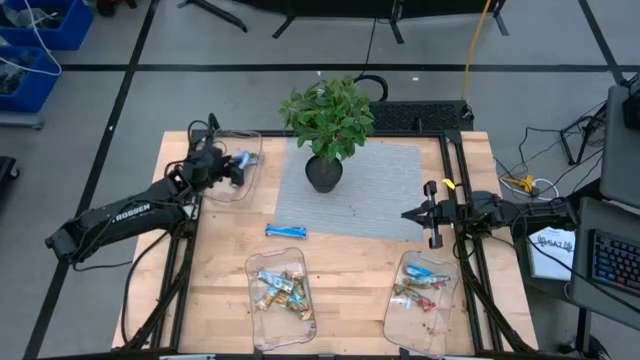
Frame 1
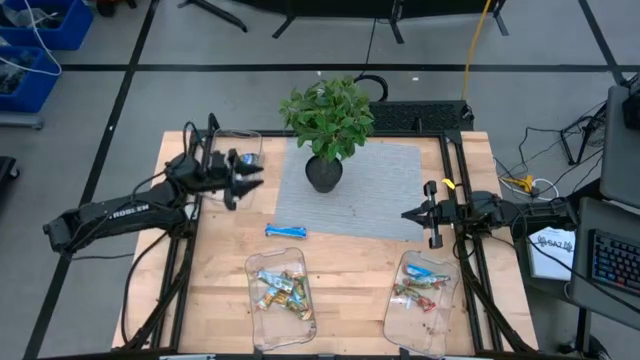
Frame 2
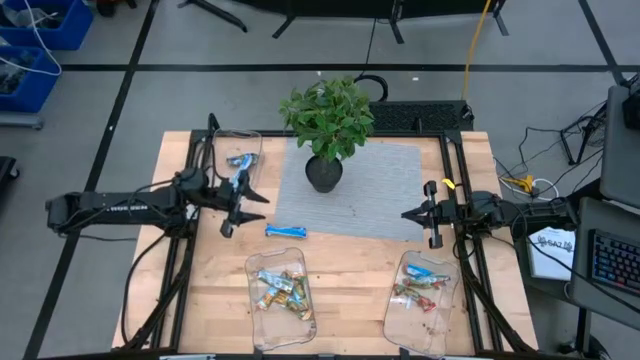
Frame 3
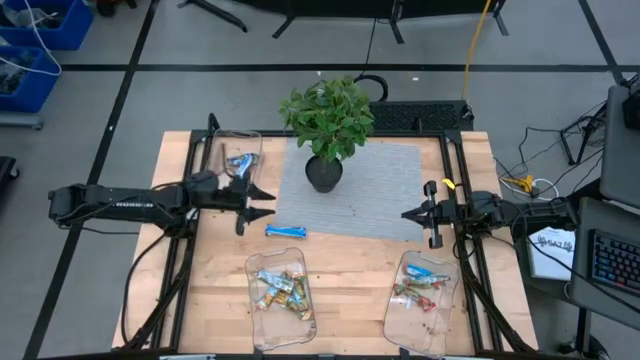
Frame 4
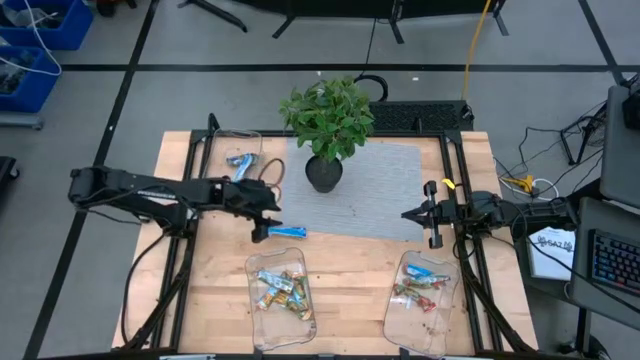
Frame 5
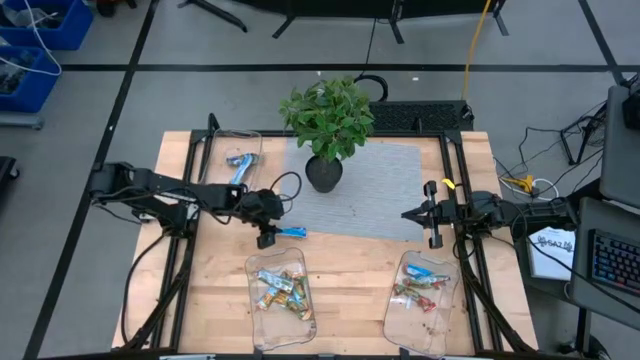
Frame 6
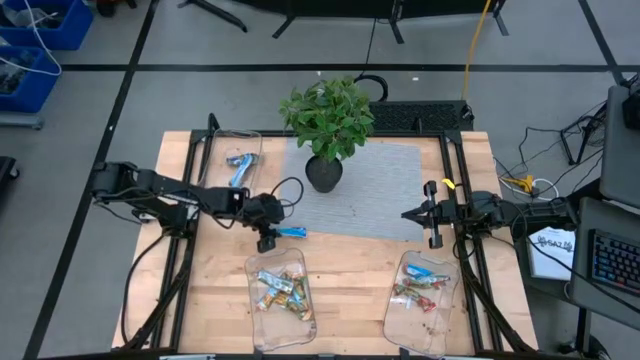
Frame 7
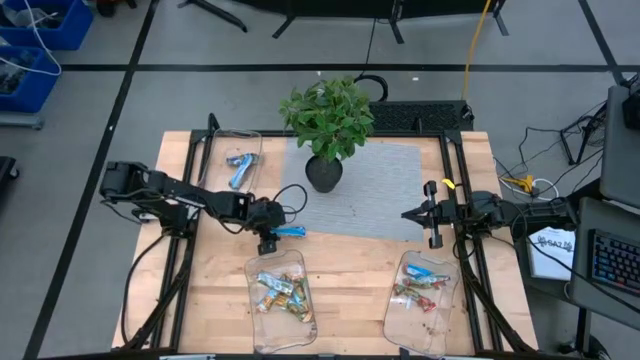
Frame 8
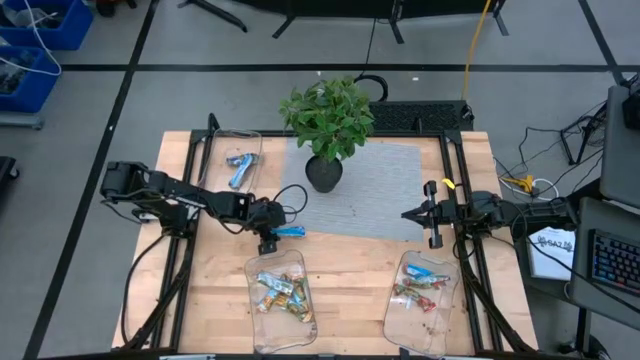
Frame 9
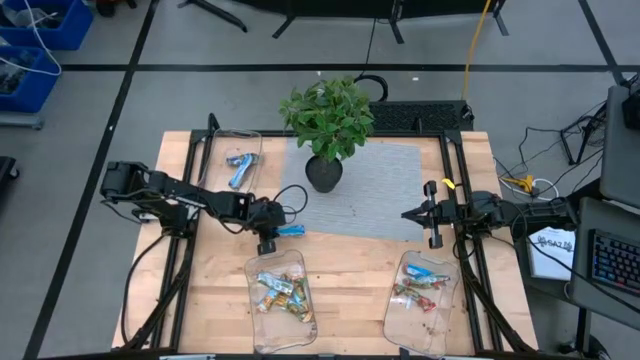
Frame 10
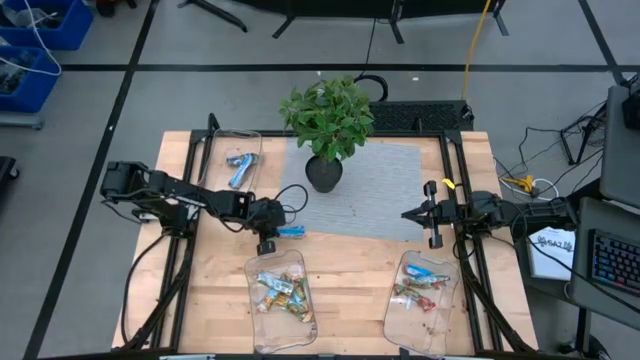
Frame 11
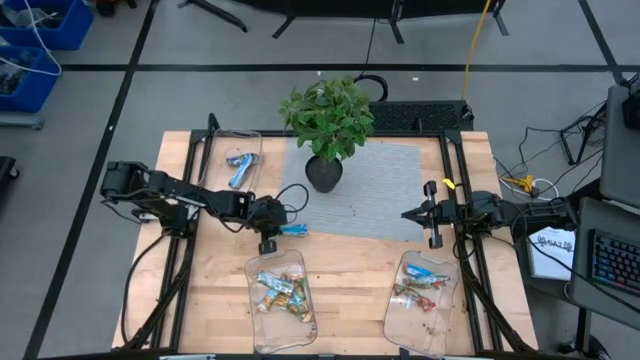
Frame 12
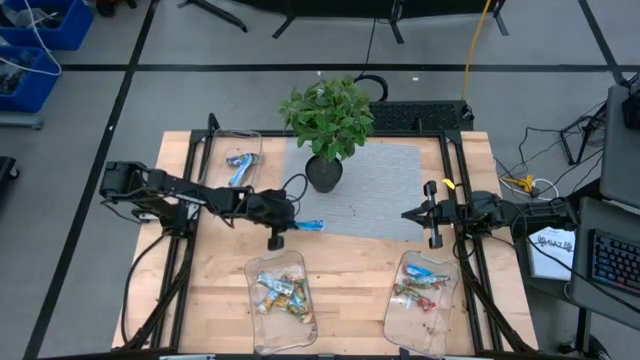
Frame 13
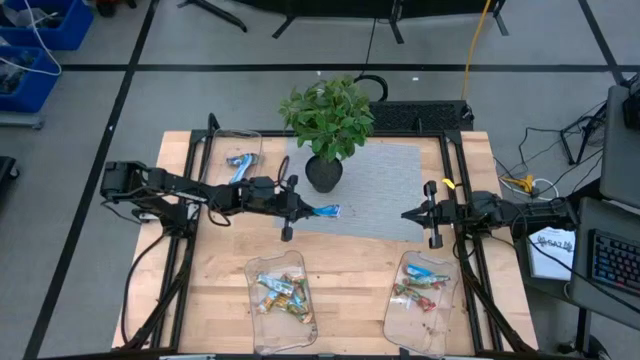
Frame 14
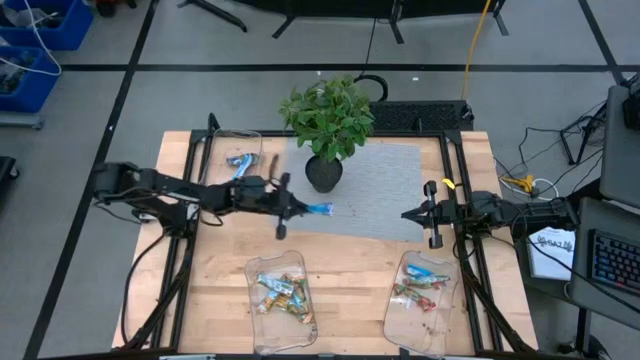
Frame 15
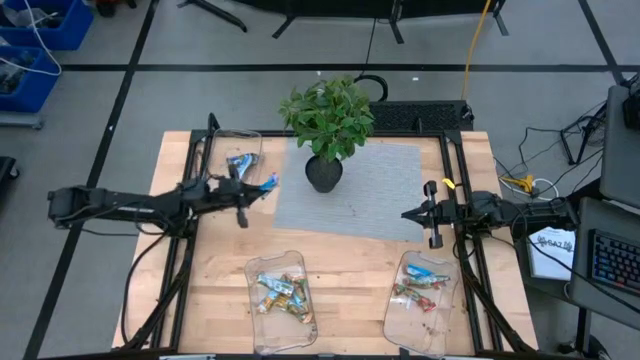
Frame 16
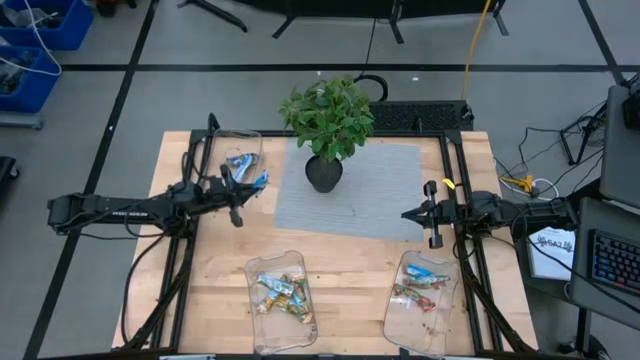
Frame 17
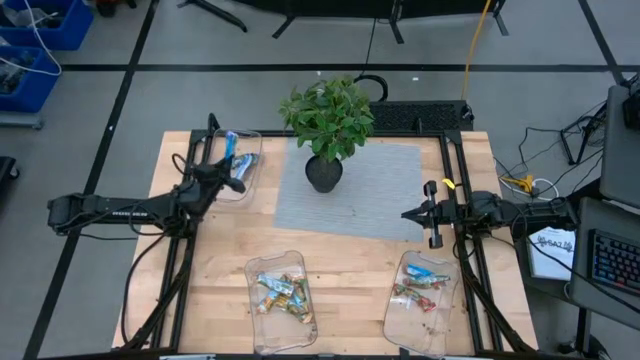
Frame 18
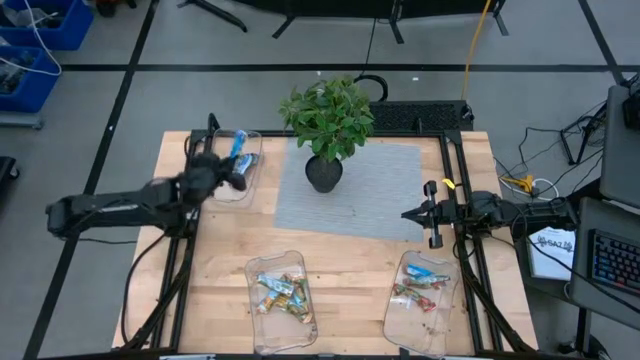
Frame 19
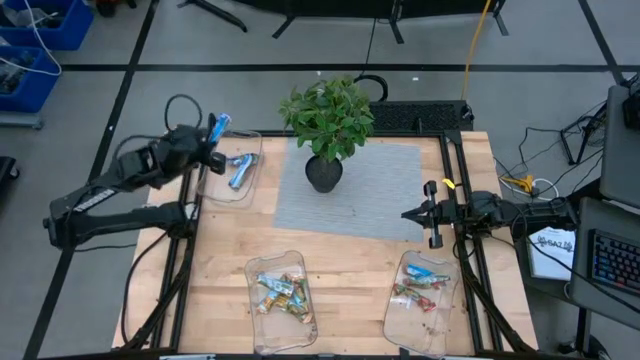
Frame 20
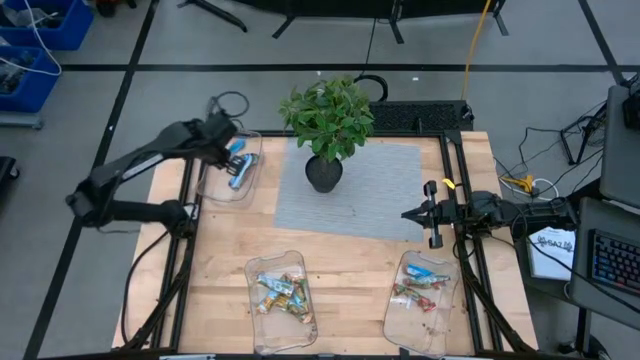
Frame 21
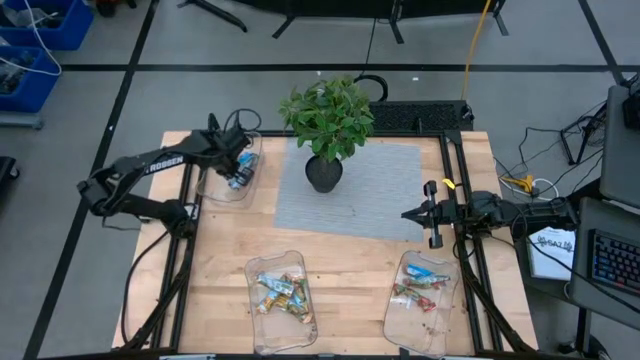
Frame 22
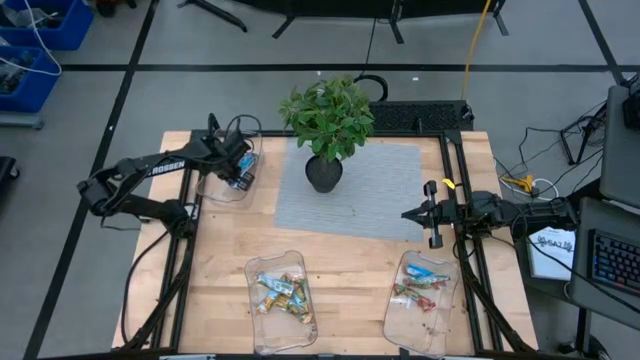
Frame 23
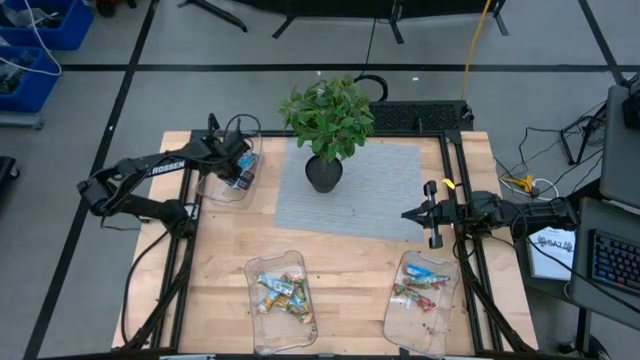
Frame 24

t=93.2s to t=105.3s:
Task: Pick and place Granola Bars by type
Put the blue granola bar into the top transparent bin

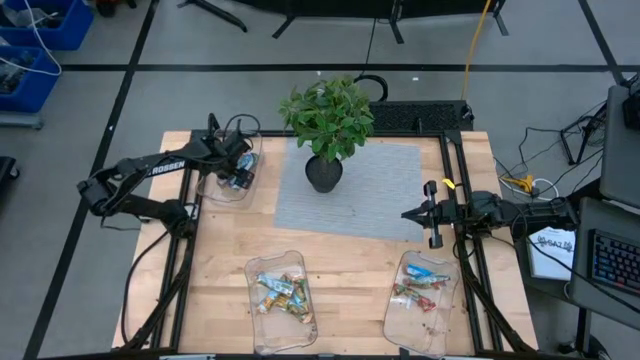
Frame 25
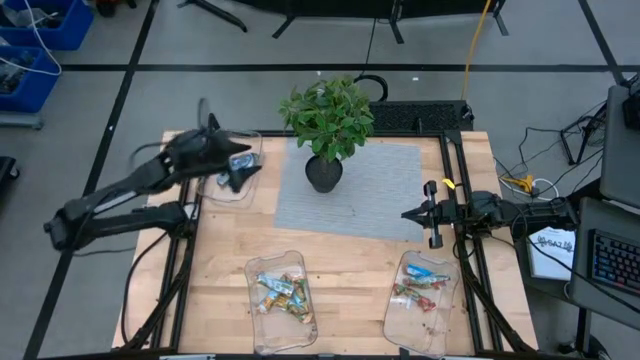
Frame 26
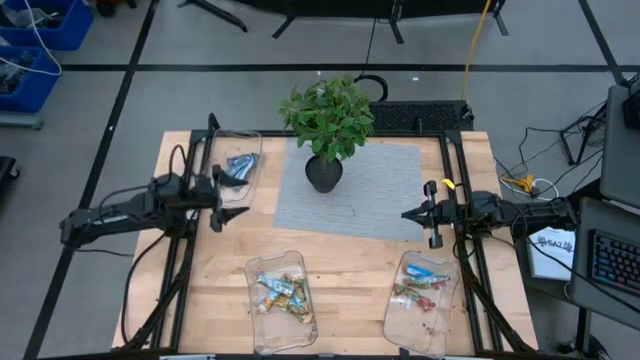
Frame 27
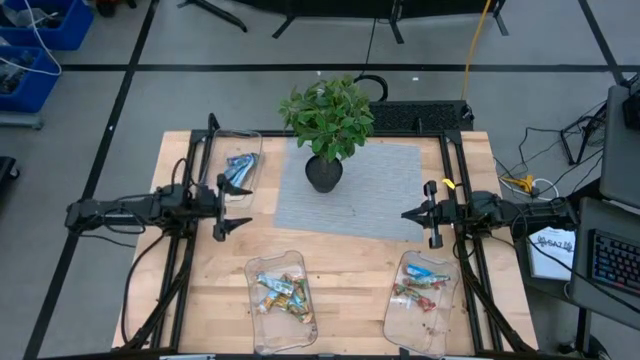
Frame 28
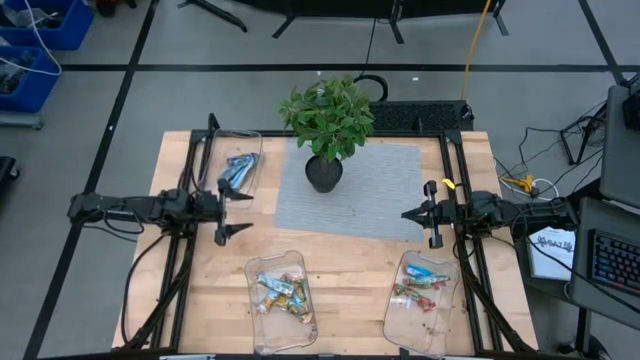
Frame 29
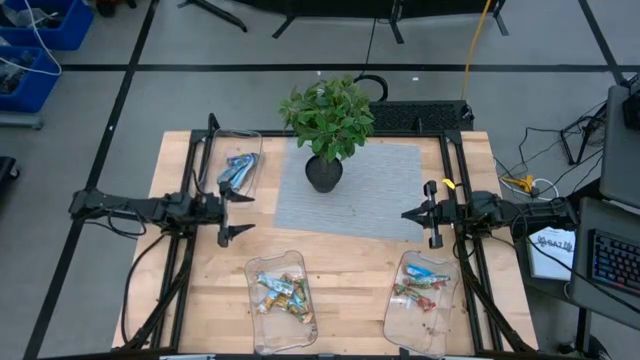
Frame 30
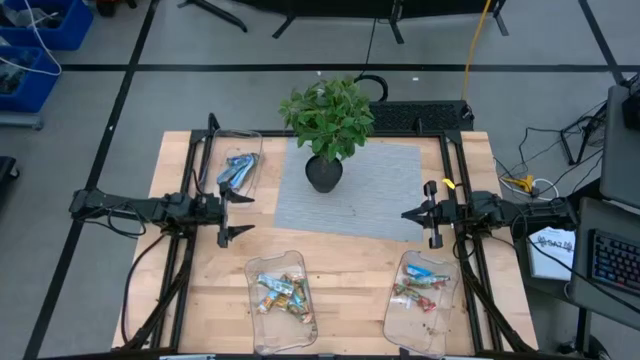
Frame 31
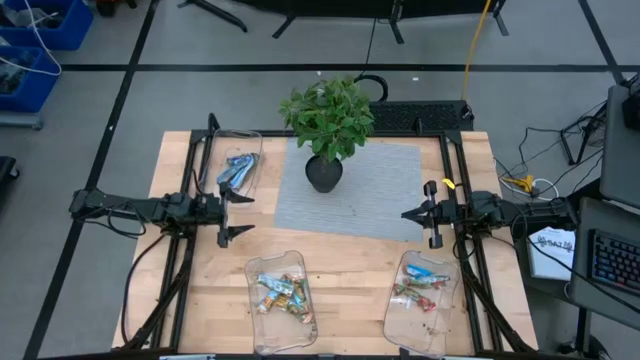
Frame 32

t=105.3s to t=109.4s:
Return to Home Position

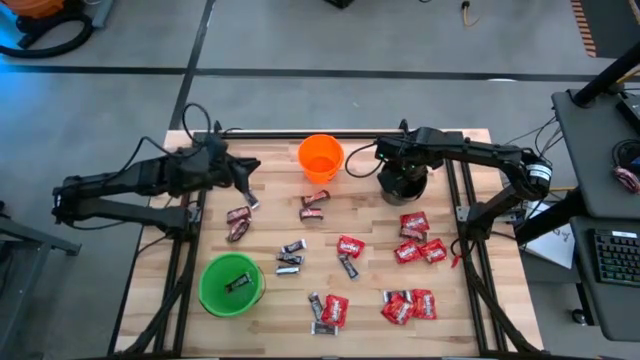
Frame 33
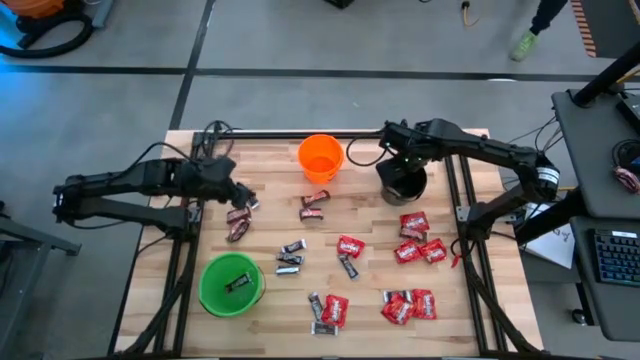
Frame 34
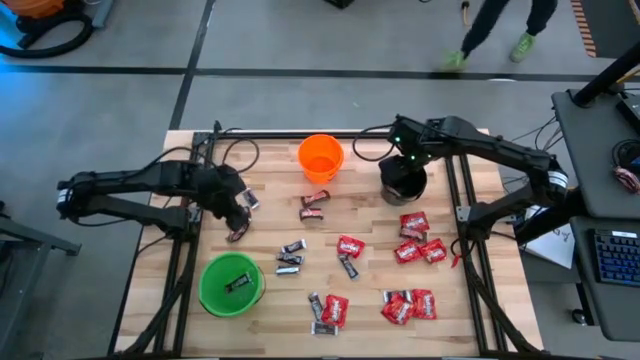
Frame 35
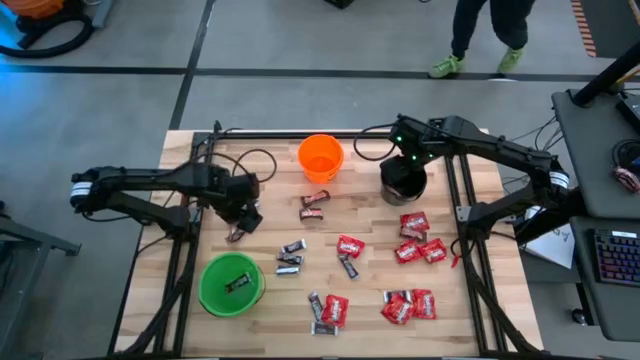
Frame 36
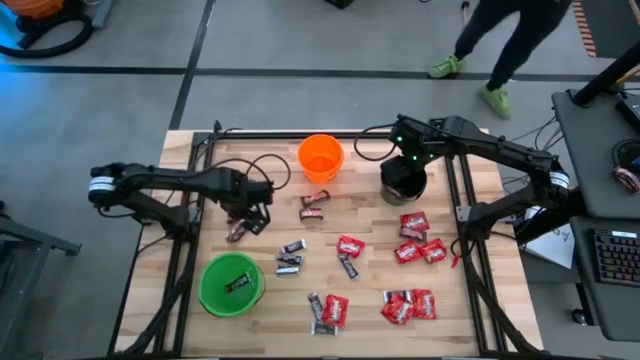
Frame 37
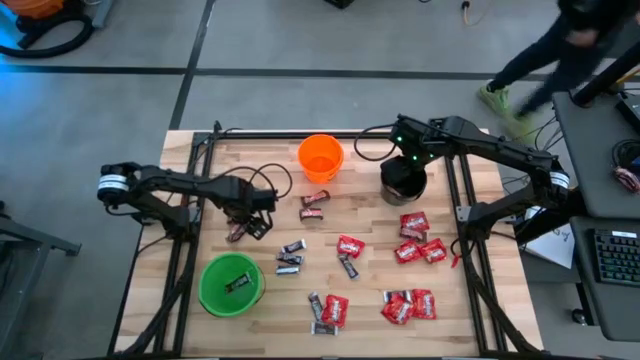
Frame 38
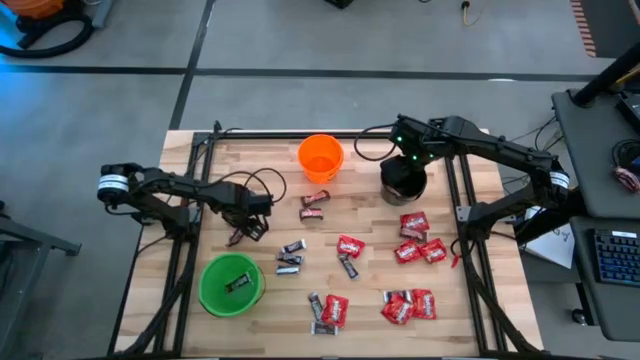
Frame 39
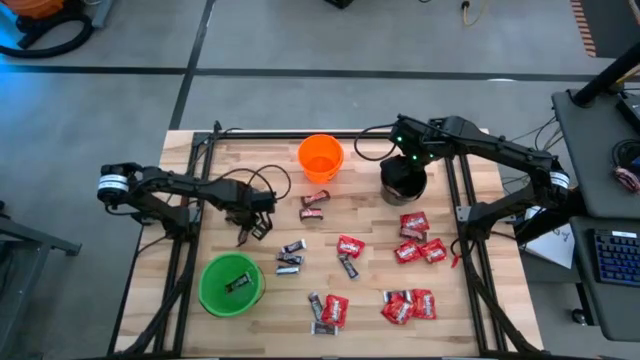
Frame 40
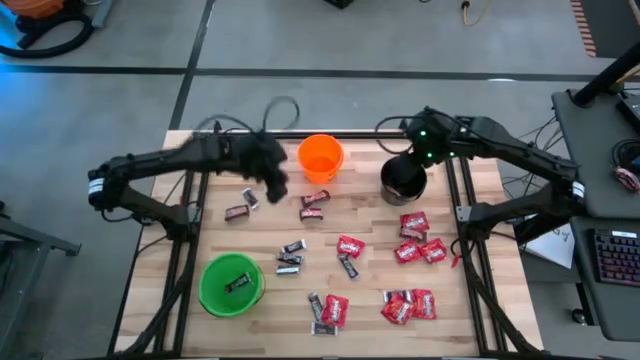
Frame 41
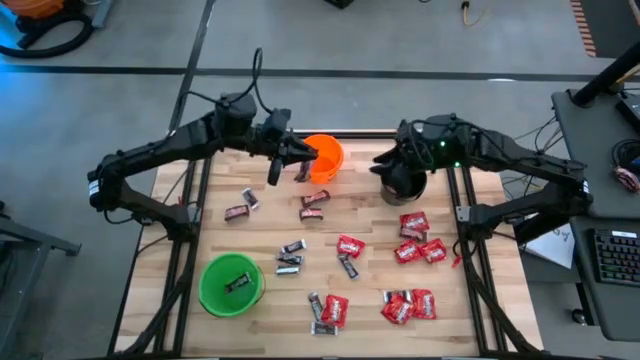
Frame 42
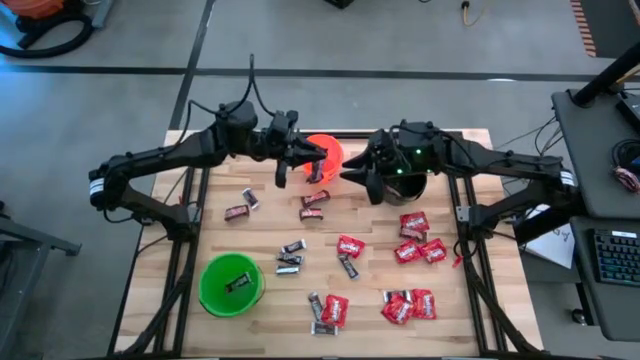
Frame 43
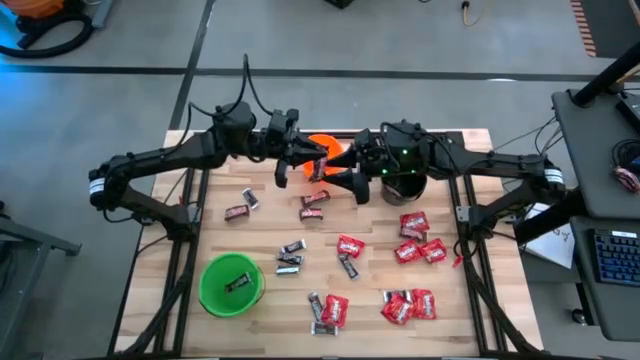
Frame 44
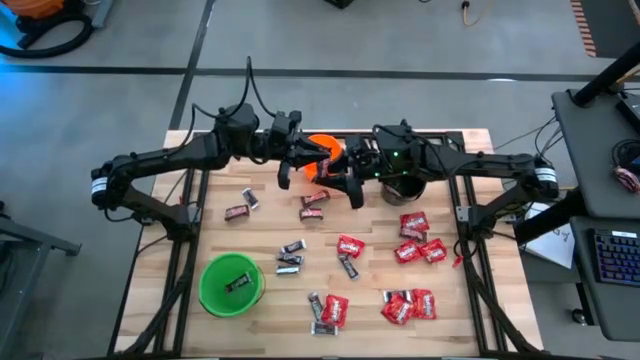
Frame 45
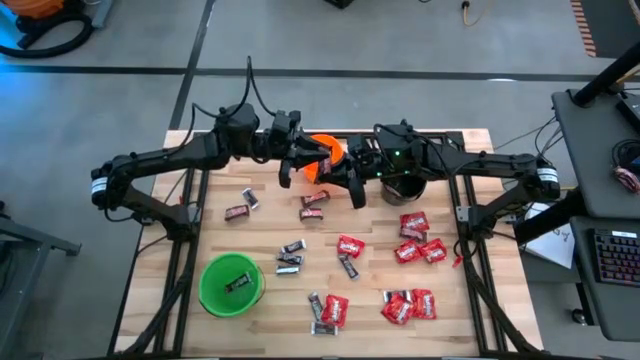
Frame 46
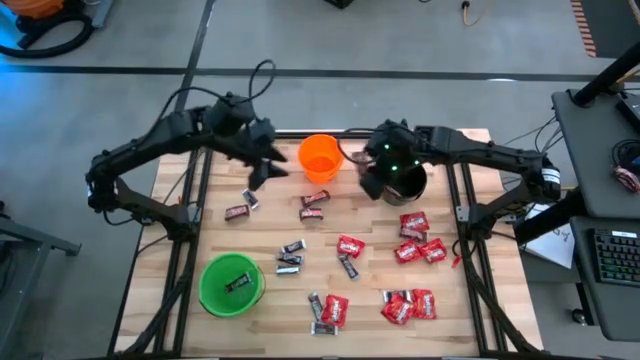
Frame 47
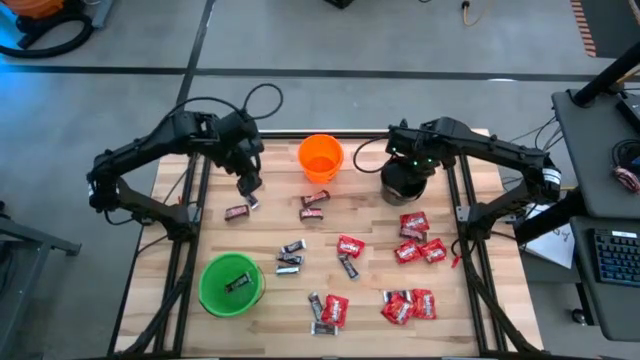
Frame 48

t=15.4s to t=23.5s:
Task: Sort candy
Put the brown chocolate into the black bucket
